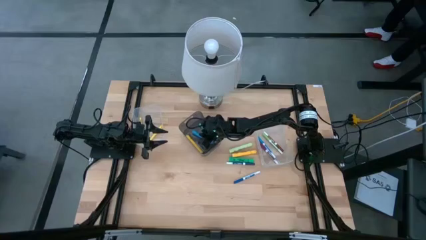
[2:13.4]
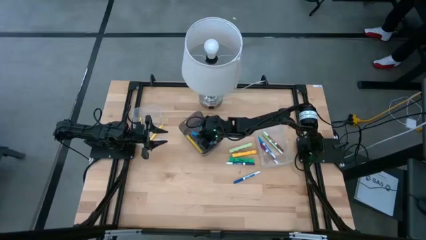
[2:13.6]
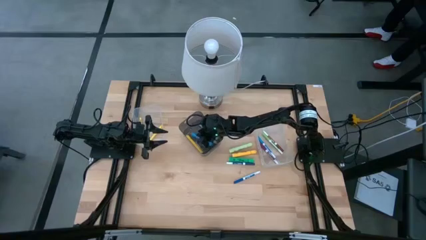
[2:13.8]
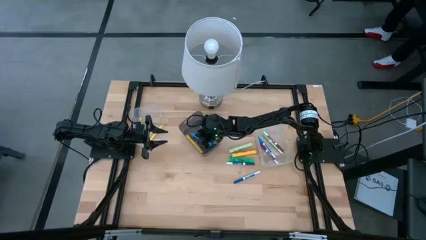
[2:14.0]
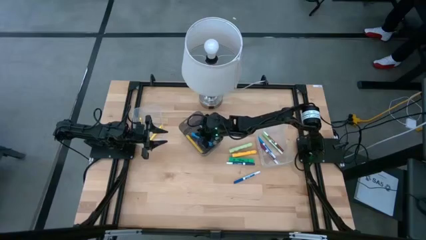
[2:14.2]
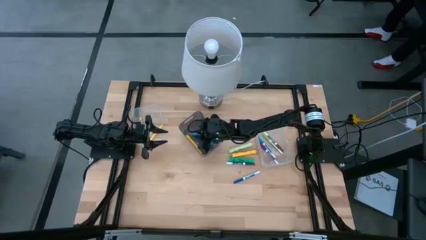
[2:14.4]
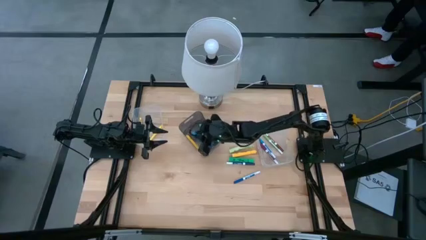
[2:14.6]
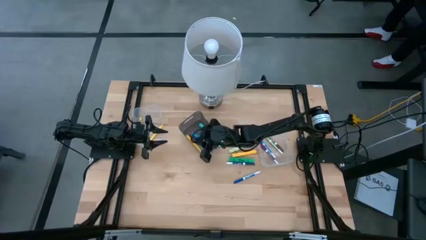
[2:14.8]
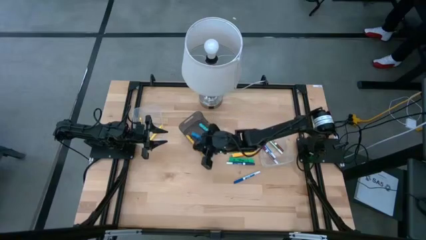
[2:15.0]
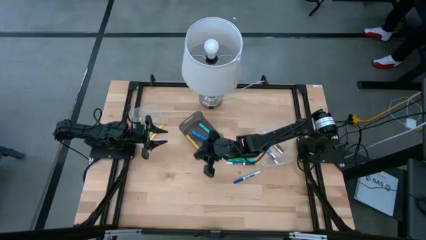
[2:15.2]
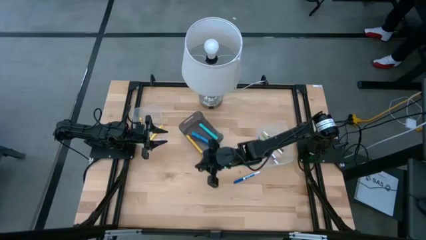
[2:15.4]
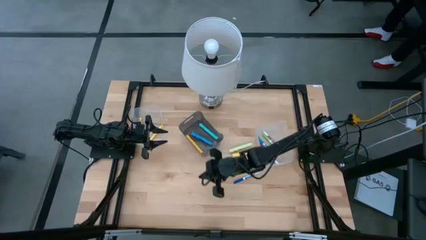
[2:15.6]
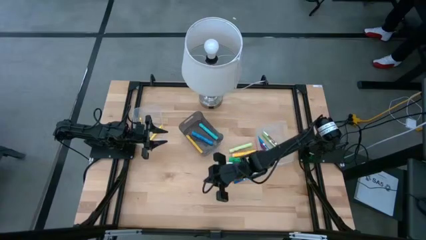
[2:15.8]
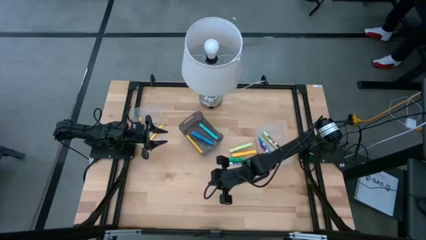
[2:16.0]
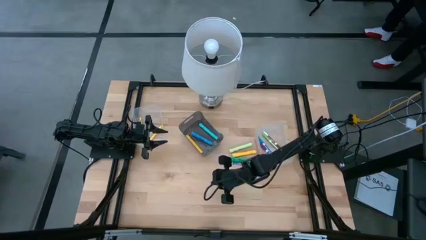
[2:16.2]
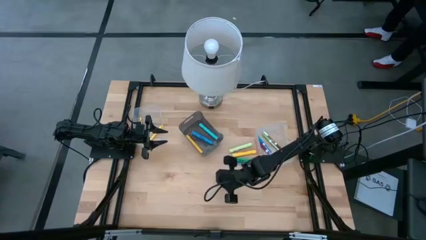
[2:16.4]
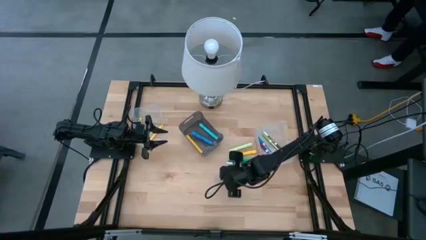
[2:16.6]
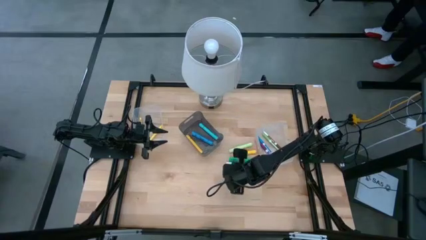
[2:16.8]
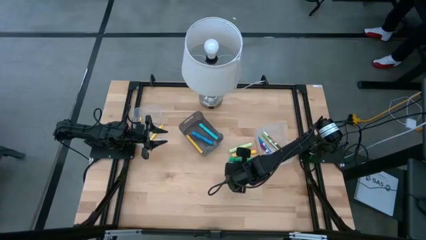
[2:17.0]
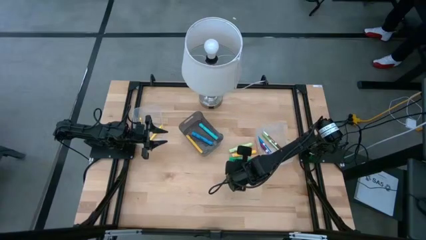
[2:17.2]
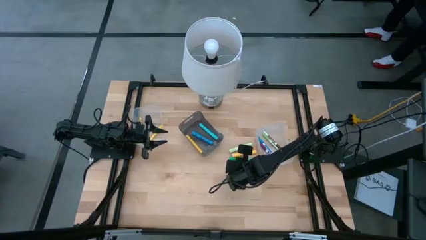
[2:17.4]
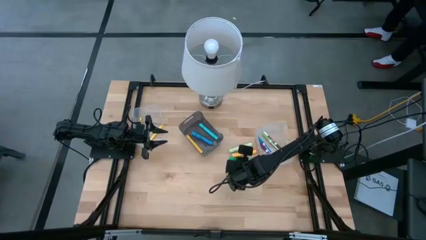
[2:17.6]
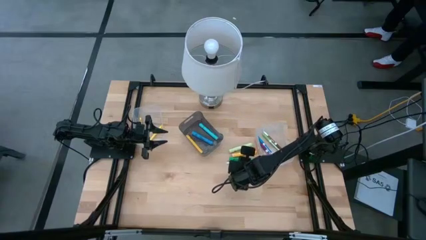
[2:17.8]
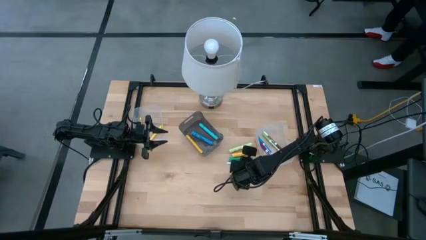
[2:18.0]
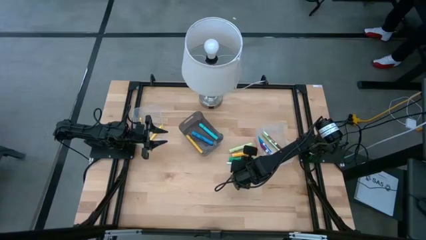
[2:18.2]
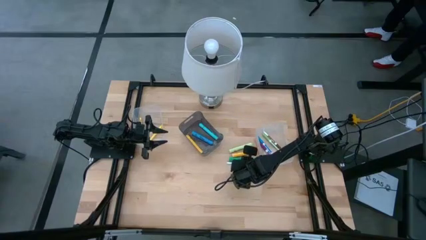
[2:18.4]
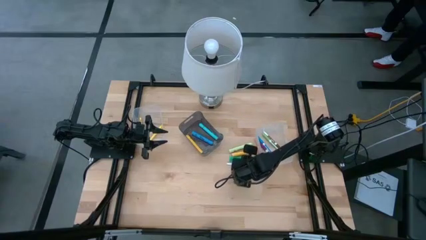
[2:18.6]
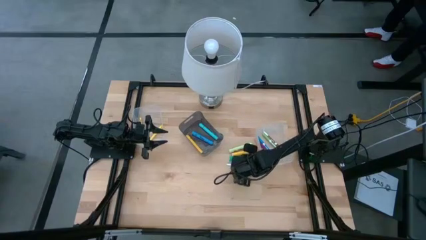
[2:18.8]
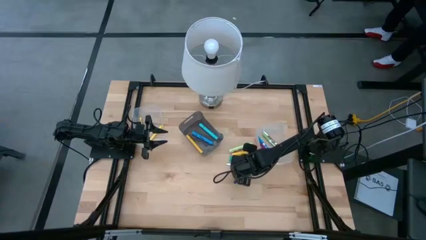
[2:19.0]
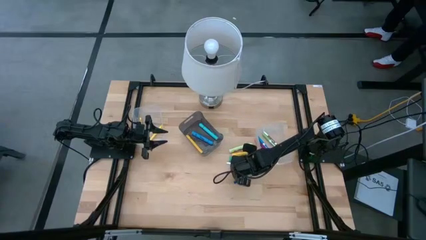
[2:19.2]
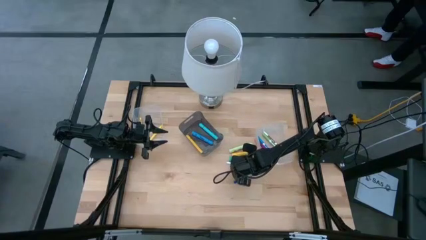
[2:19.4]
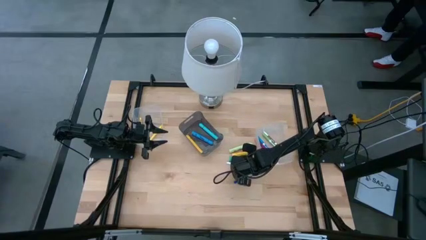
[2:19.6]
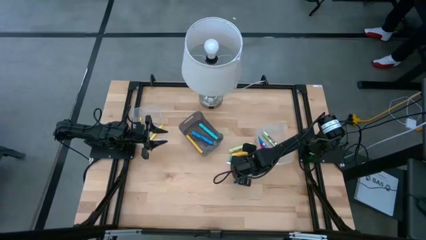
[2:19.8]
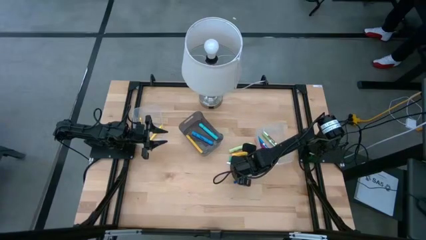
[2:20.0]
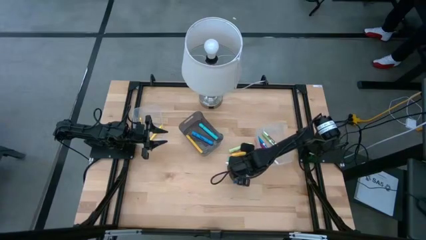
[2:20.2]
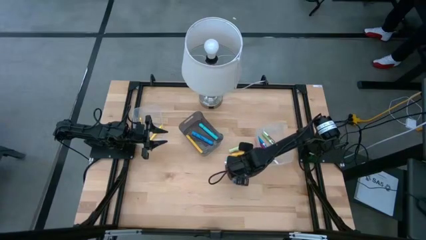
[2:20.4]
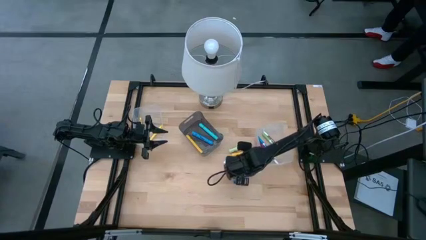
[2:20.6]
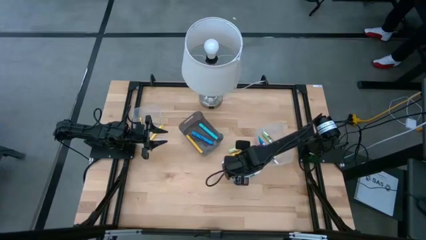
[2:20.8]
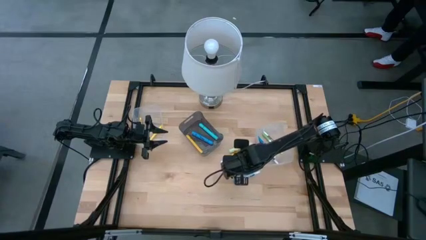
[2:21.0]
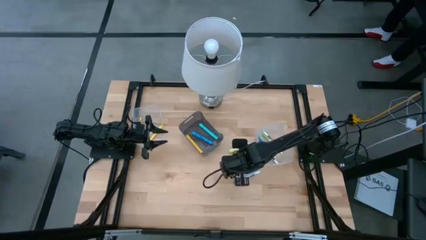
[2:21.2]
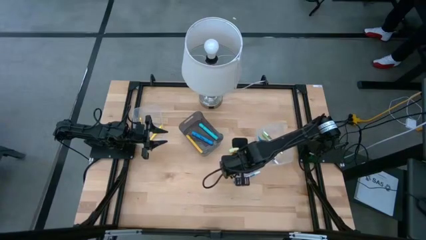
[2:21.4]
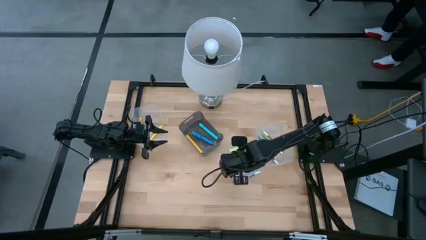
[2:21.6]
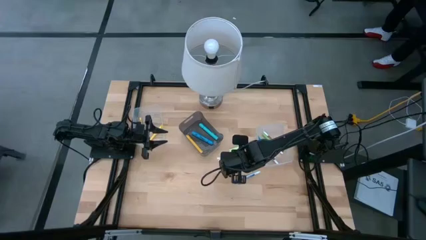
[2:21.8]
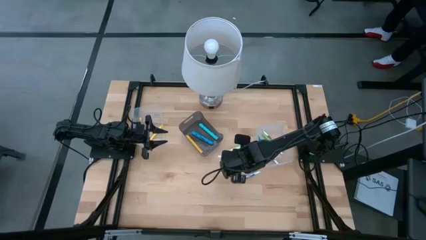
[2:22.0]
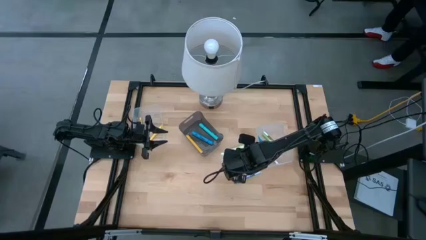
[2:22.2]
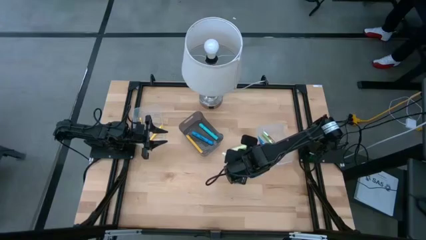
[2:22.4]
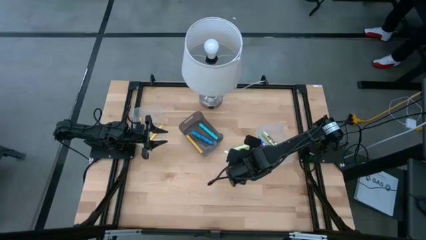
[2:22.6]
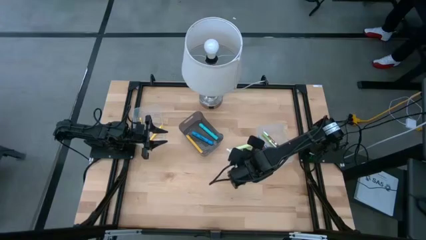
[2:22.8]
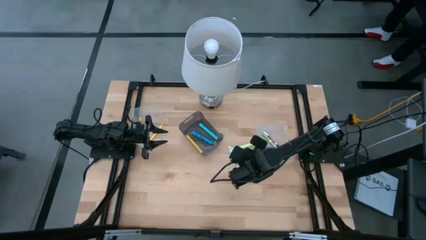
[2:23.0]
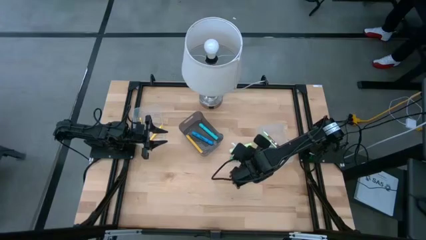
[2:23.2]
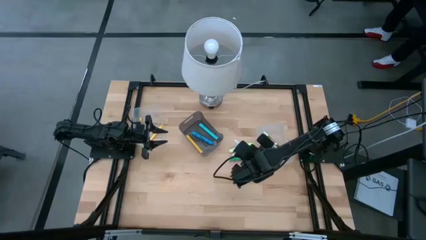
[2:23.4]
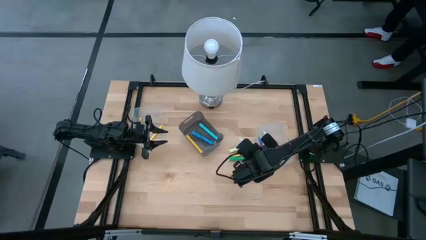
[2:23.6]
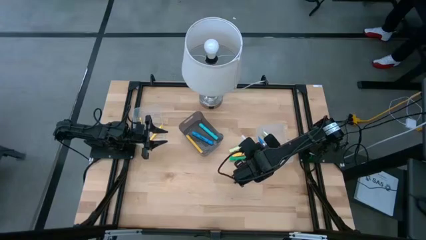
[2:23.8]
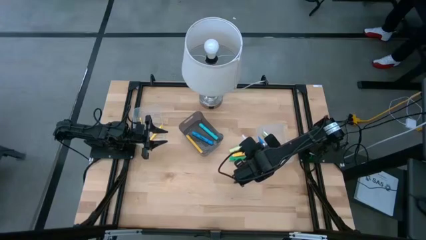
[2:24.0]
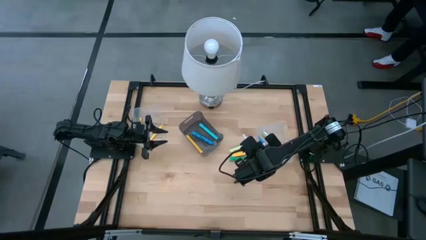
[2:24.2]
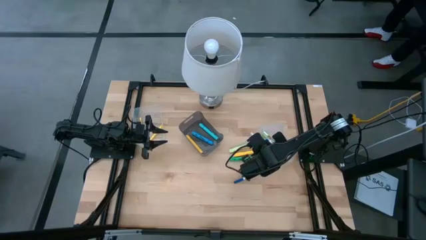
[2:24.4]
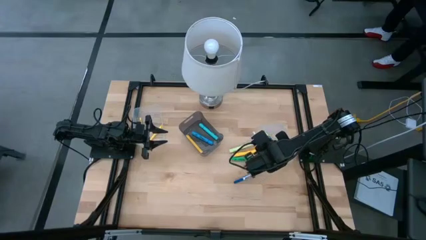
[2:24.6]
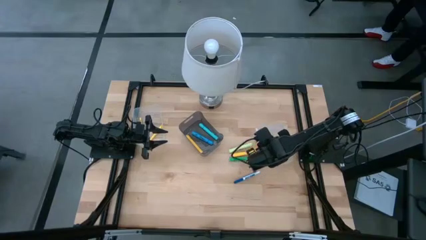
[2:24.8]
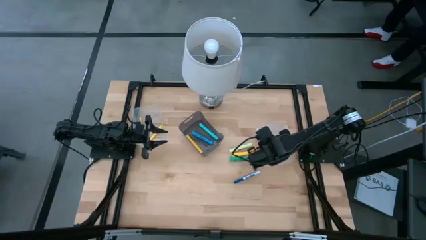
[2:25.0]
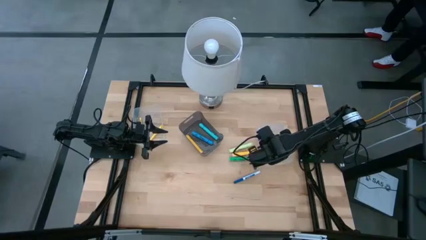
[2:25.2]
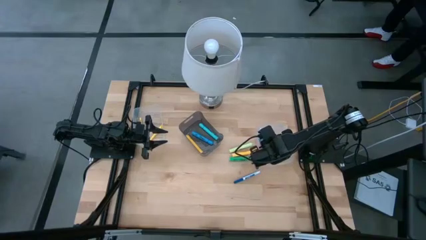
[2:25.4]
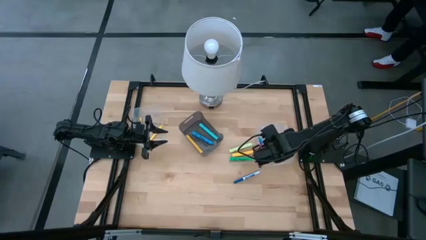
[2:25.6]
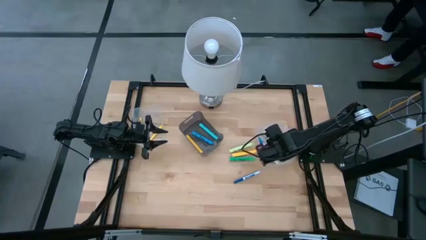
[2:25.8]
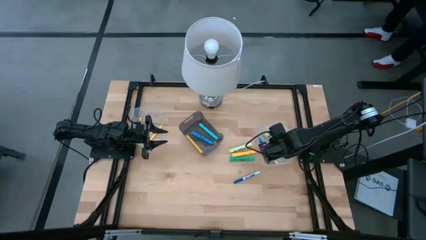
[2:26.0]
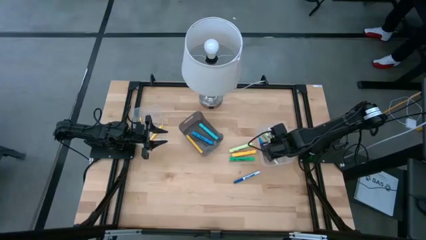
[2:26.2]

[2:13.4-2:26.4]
Task: Pick & Place Markers
Put the top dark blue highlighter into the right transparent bin
